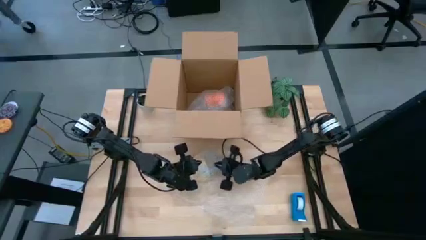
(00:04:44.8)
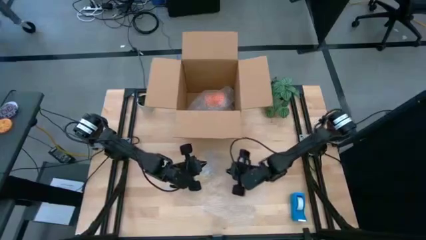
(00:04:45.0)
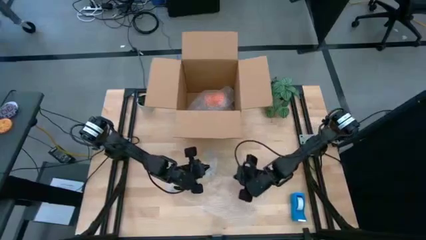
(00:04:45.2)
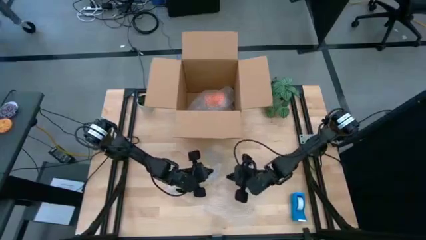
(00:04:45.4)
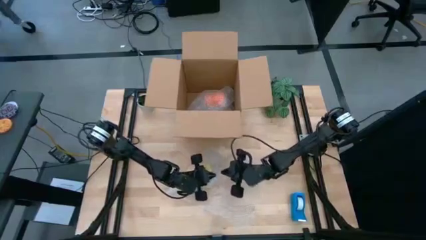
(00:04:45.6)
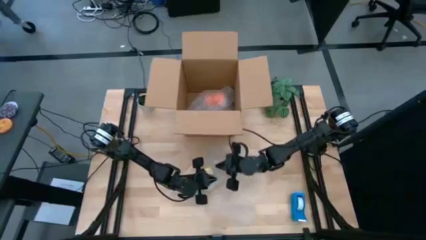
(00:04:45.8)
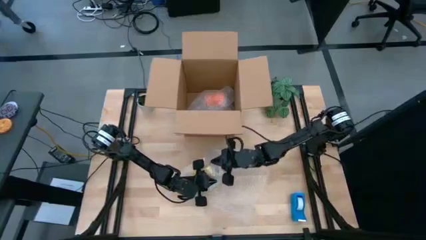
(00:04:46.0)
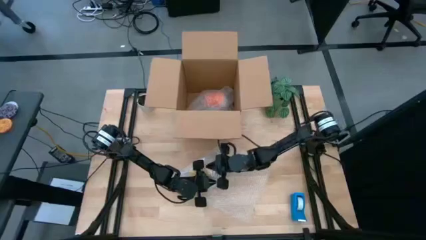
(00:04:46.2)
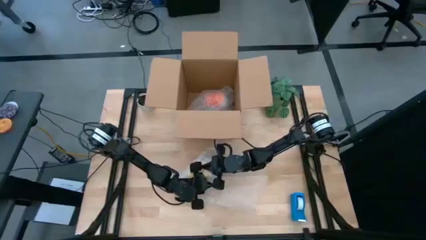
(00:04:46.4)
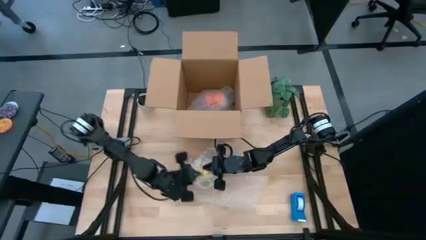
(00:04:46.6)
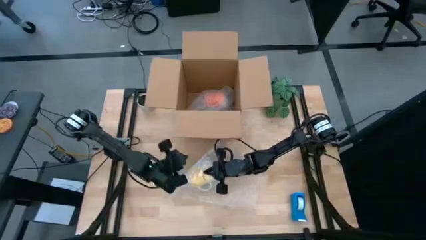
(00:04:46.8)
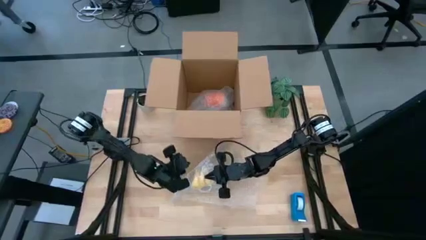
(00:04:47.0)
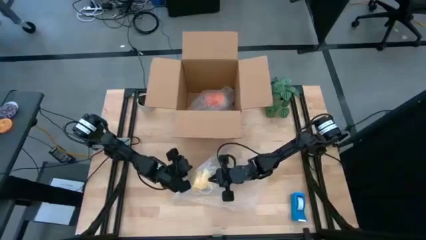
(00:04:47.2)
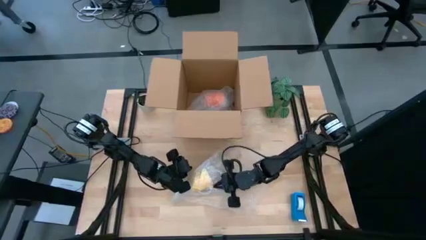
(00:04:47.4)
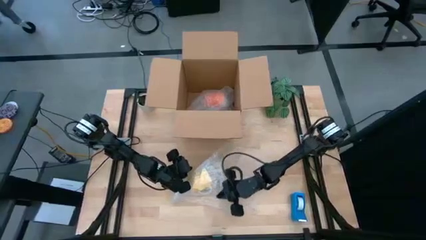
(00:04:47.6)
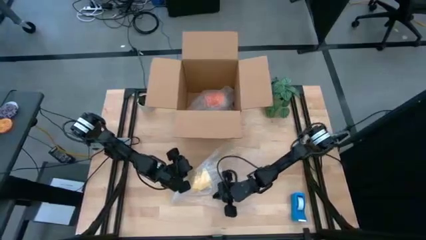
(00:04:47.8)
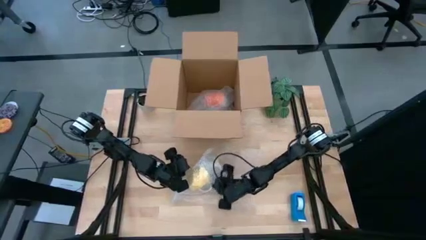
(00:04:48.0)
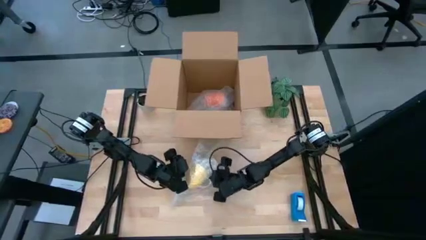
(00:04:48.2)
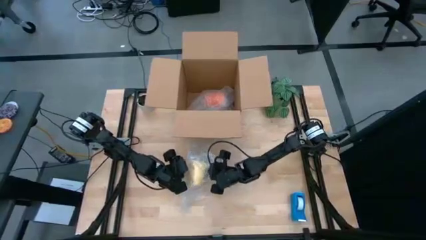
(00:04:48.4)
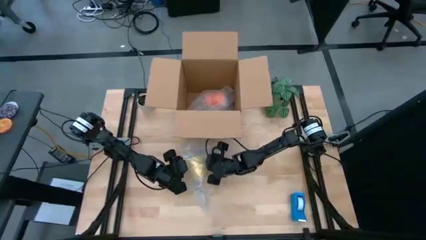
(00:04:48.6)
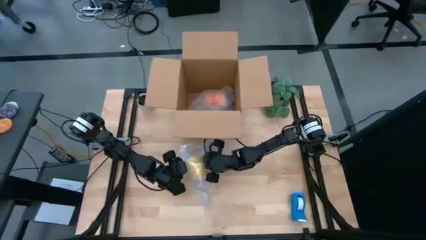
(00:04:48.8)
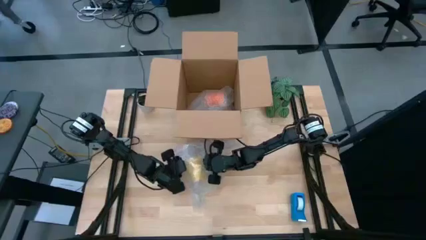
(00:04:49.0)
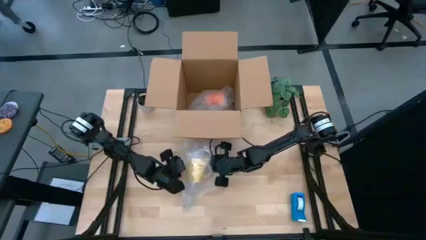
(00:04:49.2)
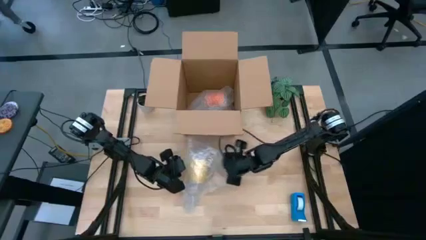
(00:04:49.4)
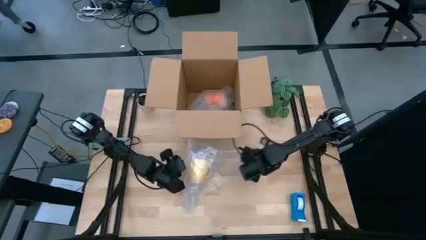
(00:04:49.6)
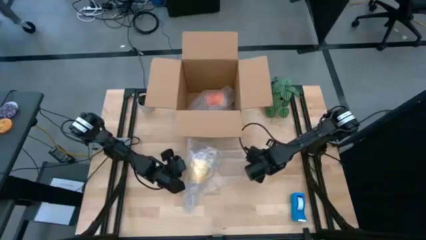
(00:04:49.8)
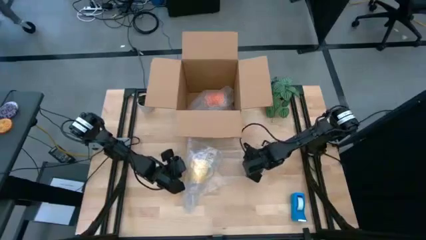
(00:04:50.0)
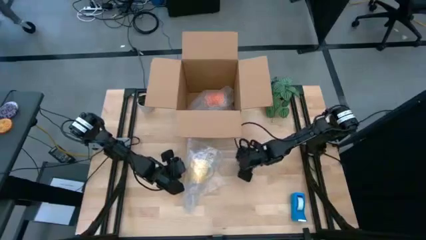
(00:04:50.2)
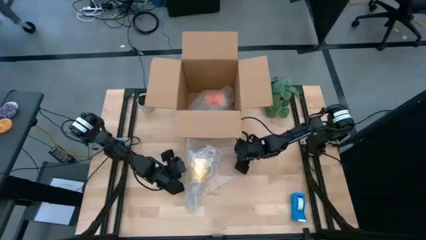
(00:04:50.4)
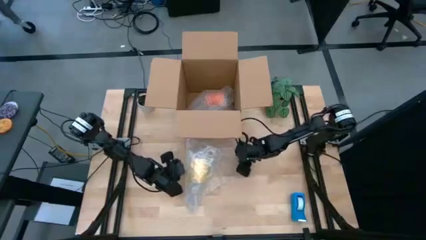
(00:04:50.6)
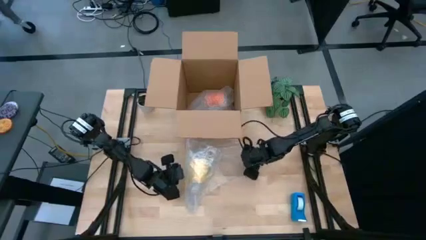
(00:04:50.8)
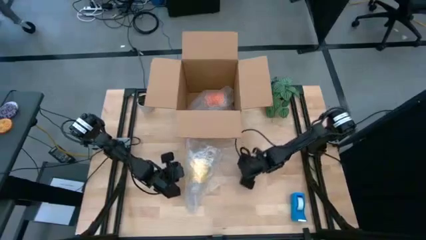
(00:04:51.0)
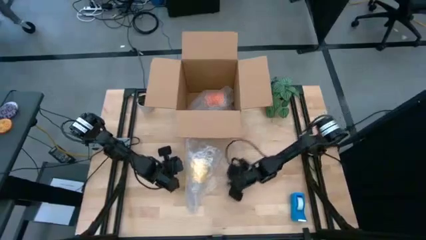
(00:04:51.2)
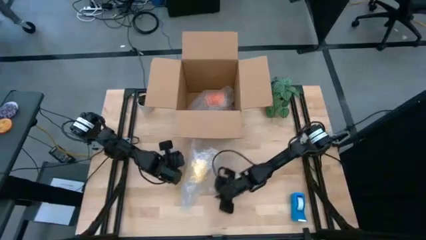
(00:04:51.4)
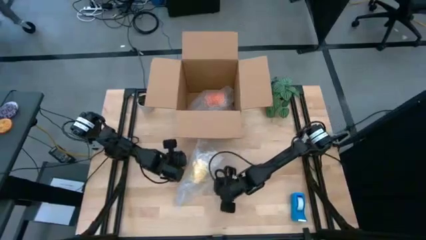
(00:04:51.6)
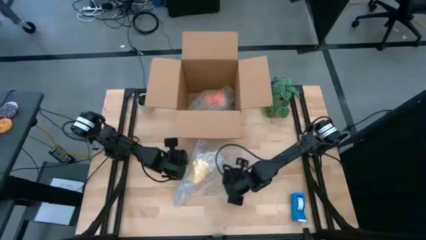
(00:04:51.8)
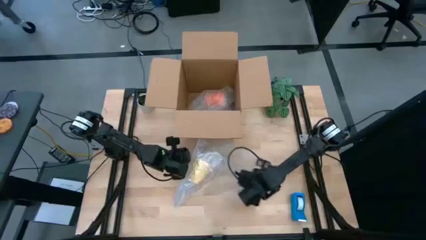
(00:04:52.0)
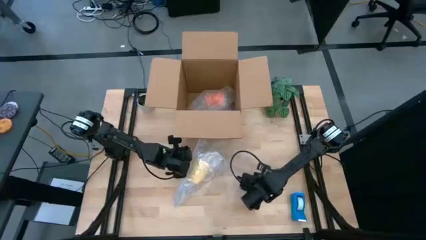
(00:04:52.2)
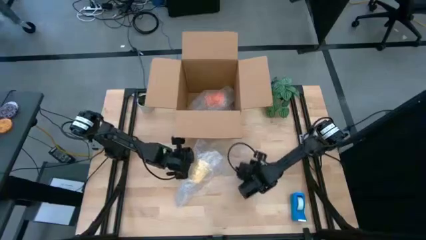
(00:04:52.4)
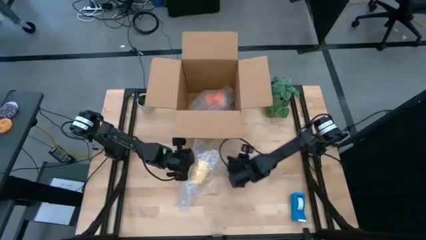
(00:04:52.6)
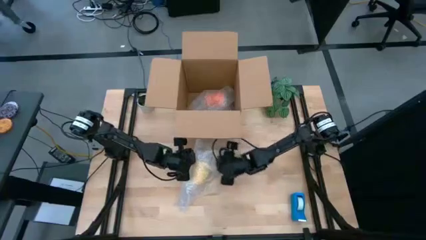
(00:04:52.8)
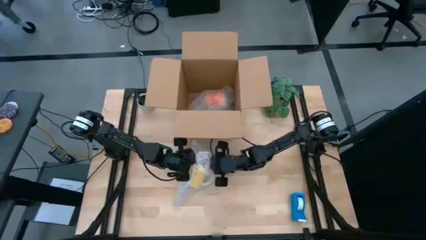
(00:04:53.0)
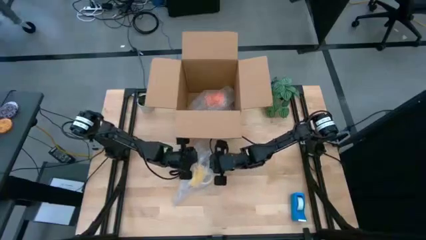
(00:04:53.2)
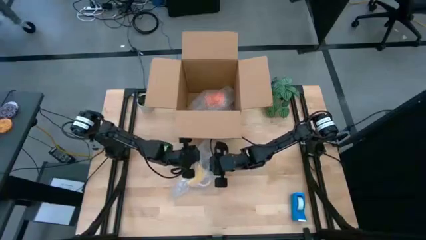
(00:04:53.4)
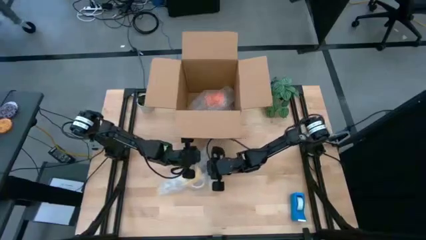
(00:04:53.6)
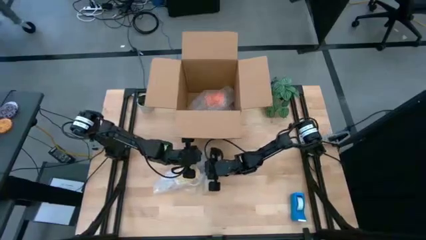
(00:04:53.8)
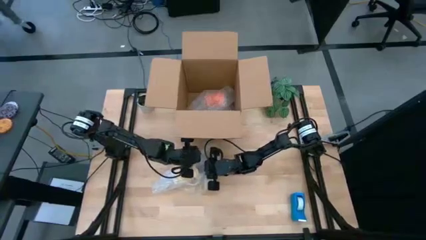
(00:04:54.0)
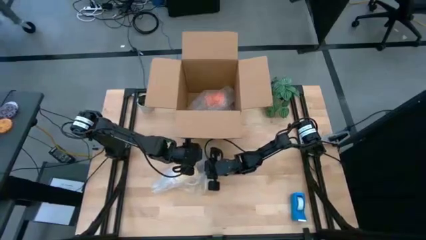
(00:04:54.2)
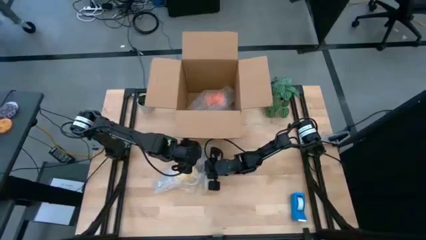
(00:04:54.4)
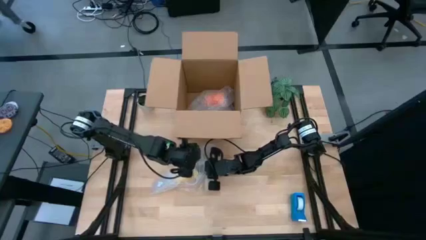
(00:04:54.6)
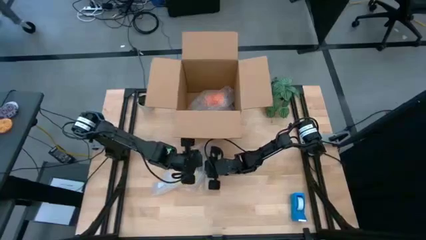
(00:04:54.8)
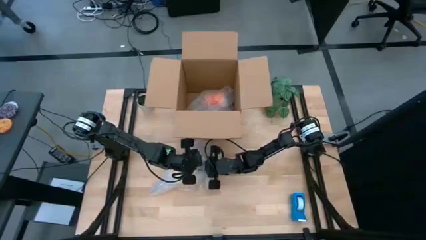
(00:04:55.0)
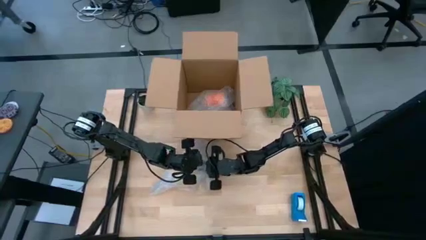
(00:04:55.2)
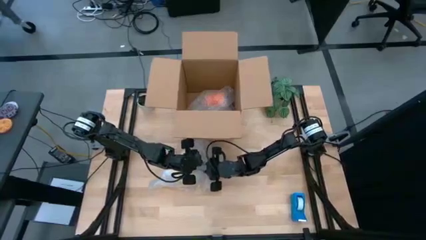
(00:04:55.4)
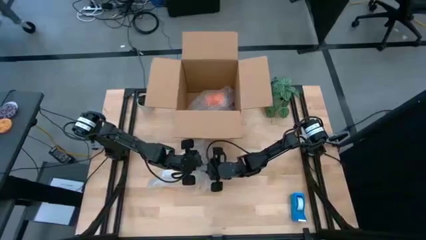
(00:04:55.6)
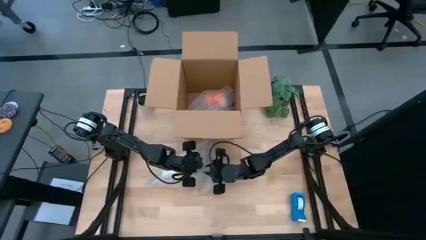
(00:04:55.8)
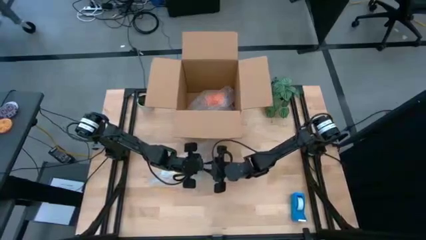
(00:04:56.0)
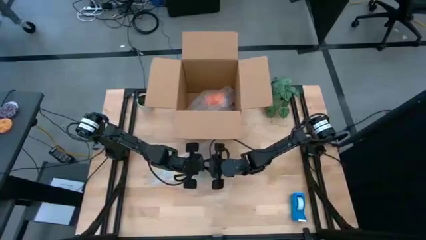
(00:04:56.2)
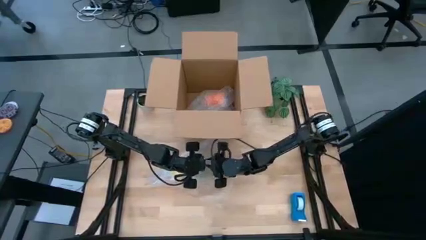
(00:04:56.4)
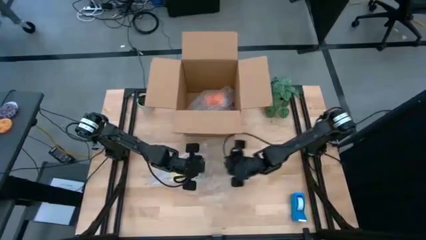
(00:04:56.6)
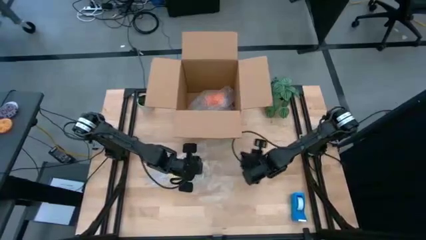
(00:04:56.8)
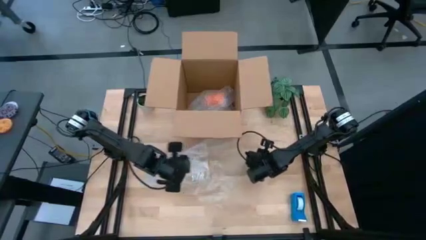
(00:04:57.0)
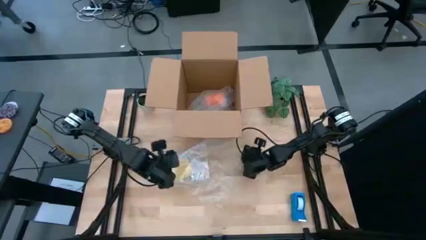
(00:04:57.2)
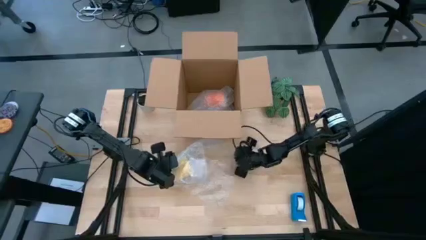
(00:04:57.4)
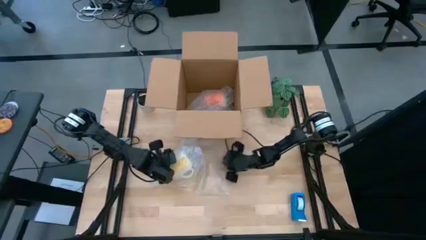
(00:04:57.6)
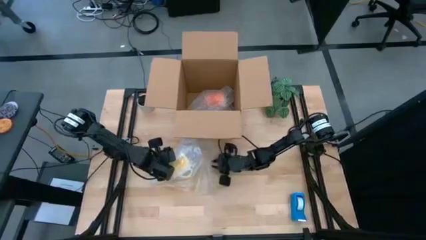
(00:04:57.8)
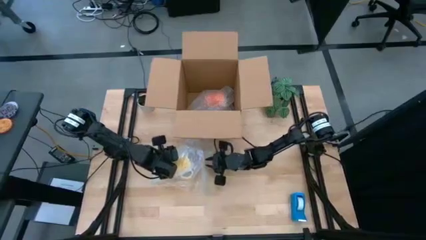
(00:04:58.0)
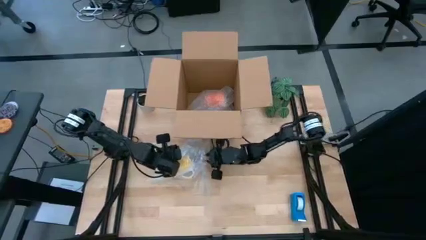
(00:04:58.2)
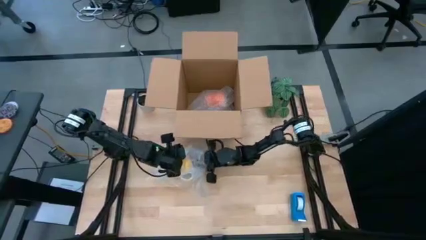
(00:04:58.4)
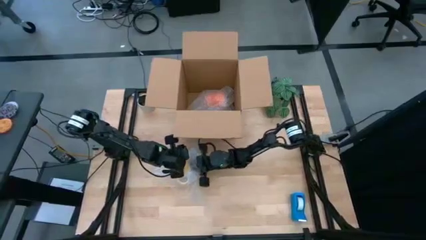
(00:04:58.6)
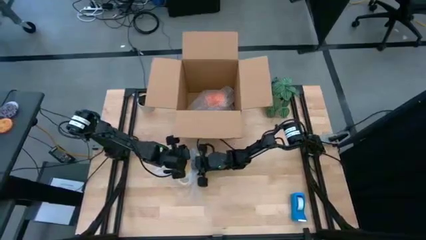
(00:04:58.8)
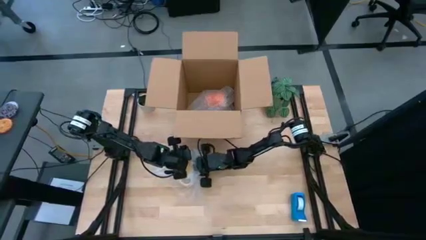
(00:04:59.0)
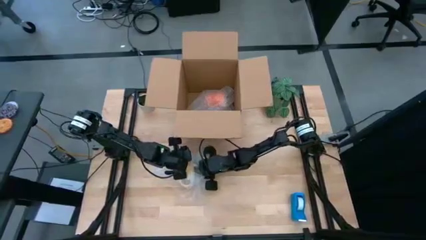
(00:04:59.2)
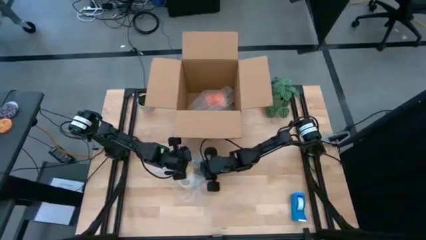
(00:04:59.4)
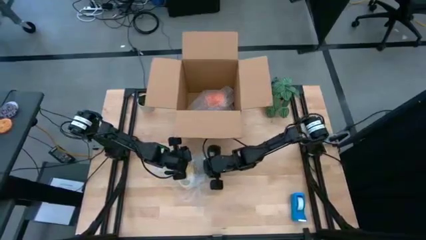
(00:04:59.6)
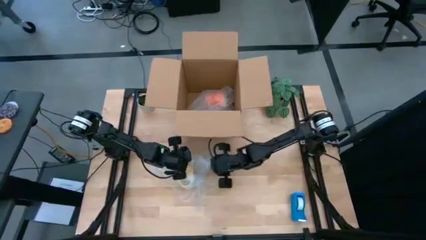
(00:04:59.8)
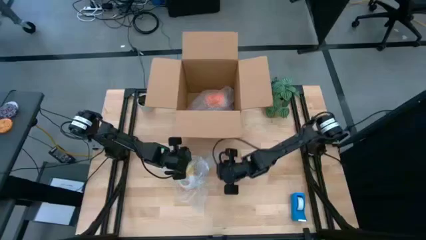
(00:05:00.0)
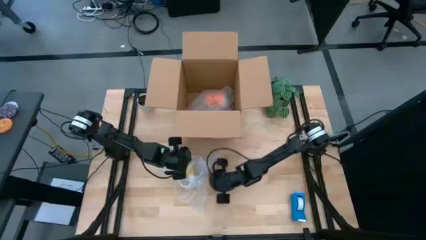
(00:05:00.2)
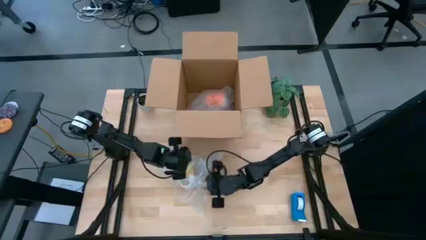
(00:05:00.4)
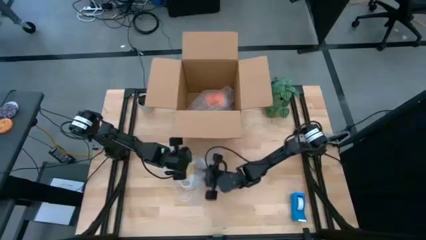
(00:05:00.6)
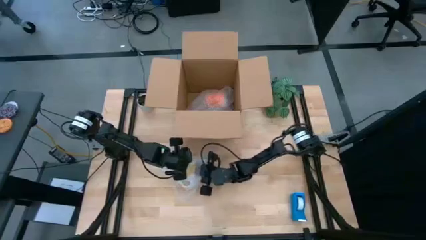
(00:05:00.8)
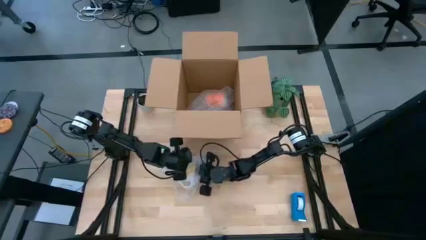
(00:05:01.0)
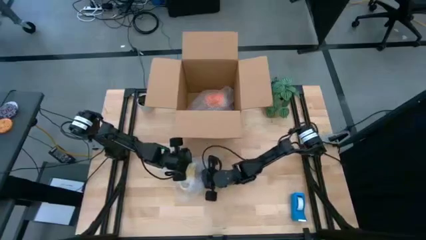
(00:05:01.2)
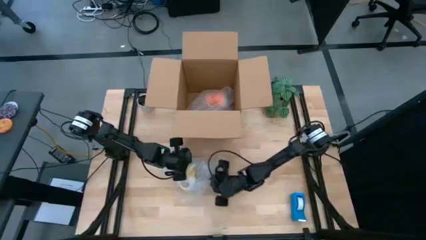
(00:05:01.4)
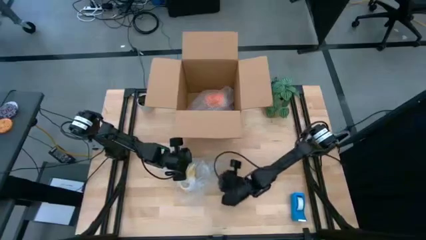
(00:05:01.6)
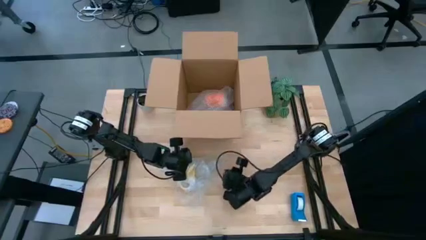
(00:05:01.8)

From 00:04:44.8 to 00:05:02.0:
Task: wrap mug
Wrap the yellow mug with the bubble wrap
